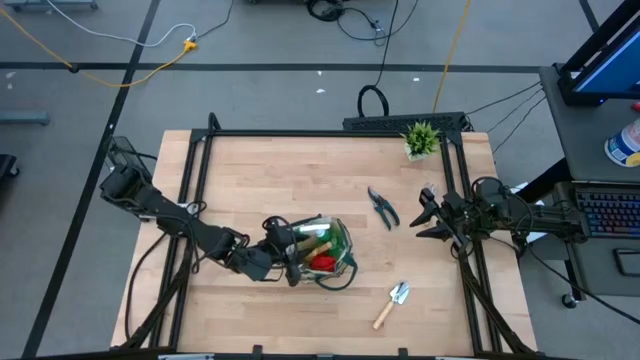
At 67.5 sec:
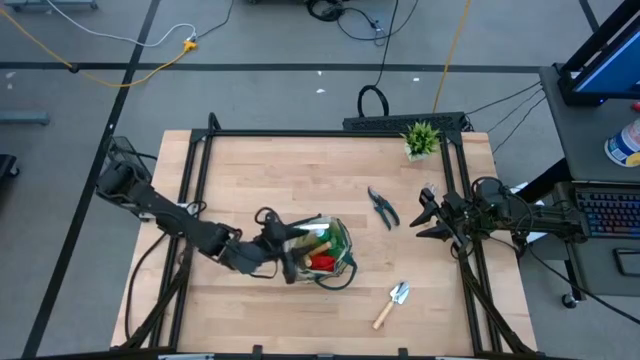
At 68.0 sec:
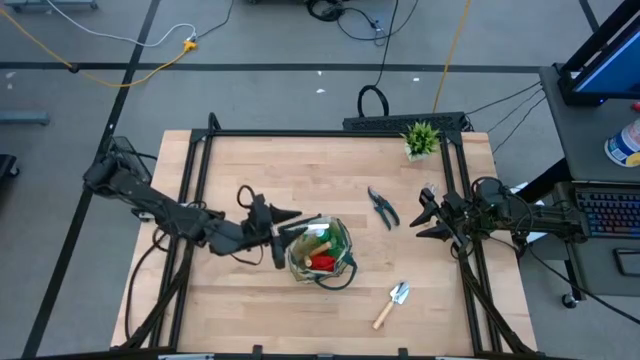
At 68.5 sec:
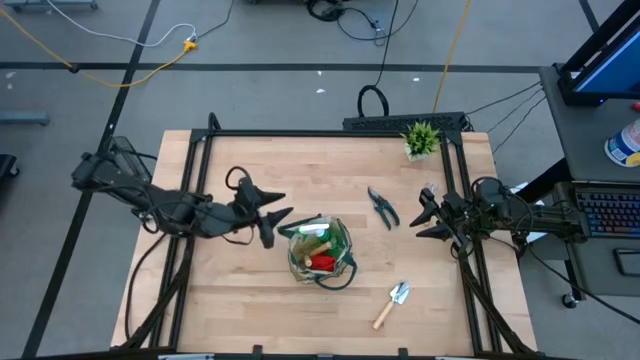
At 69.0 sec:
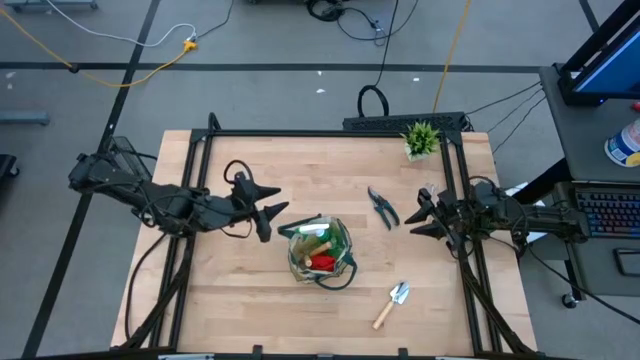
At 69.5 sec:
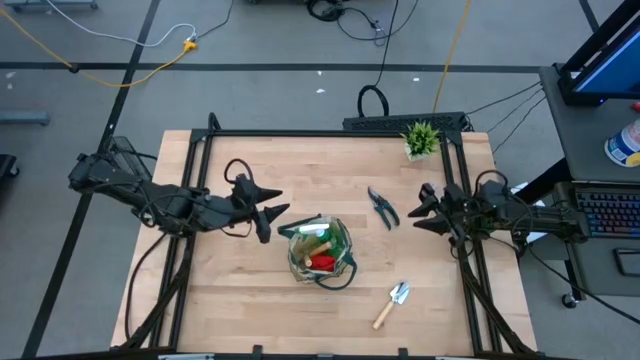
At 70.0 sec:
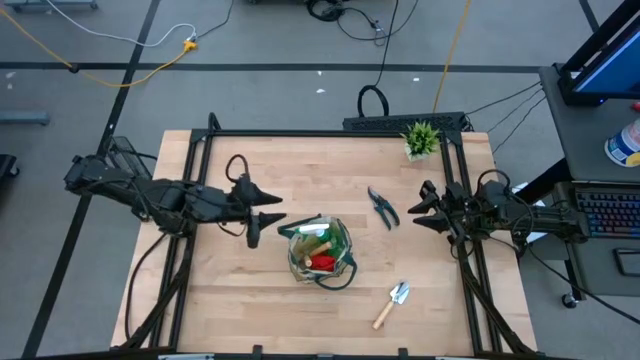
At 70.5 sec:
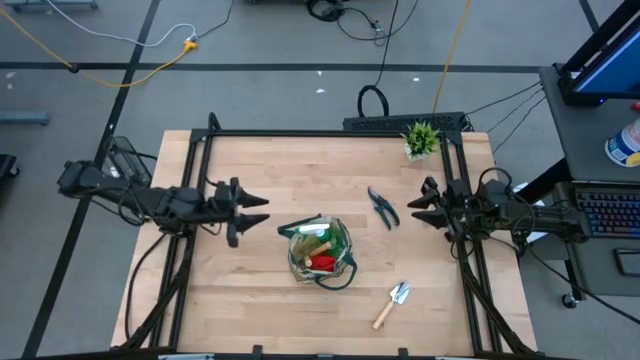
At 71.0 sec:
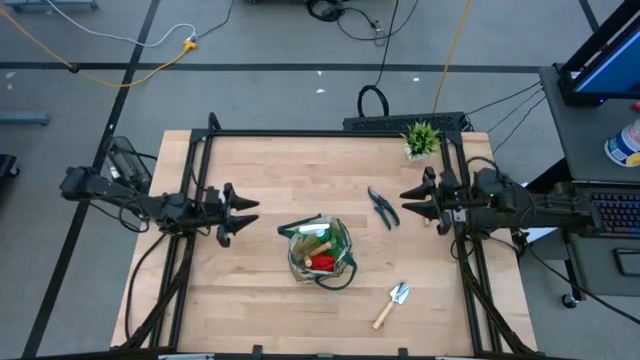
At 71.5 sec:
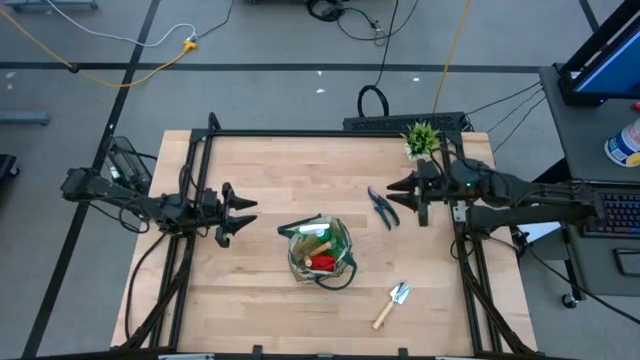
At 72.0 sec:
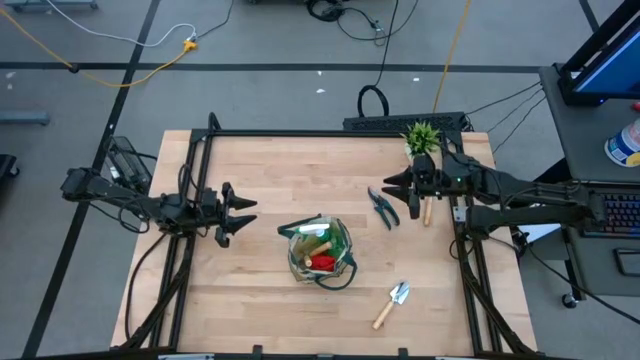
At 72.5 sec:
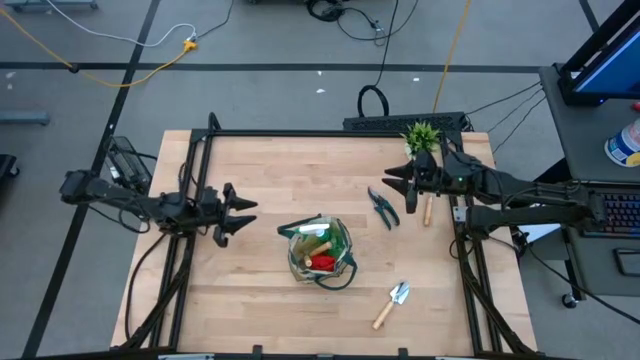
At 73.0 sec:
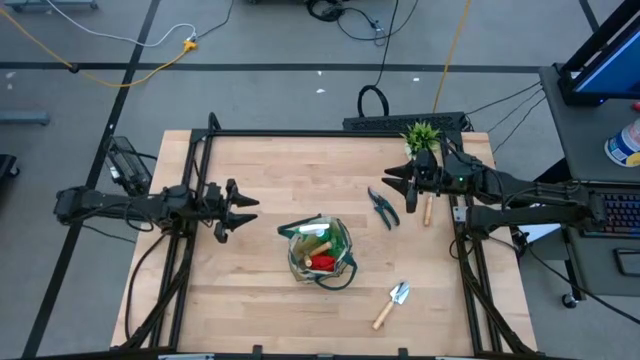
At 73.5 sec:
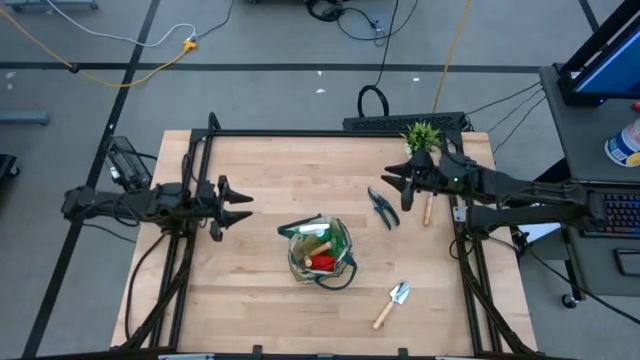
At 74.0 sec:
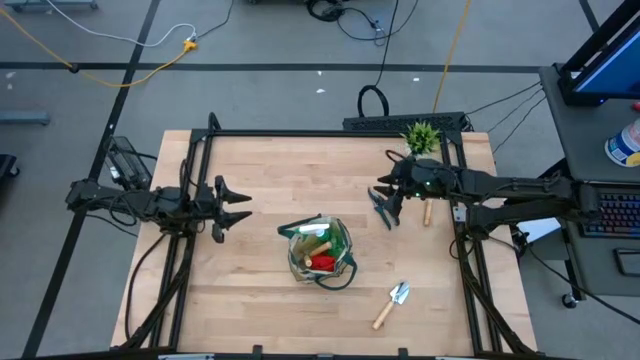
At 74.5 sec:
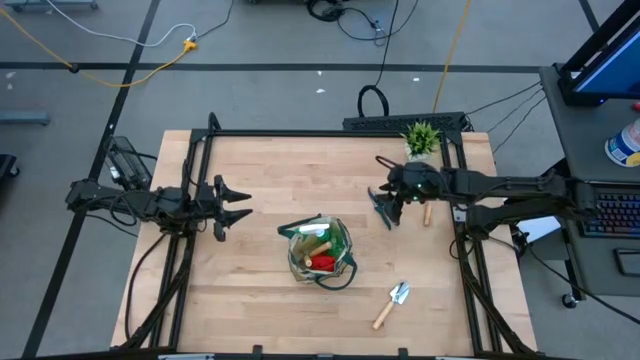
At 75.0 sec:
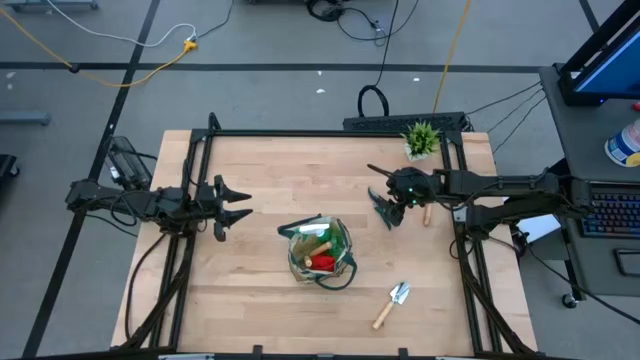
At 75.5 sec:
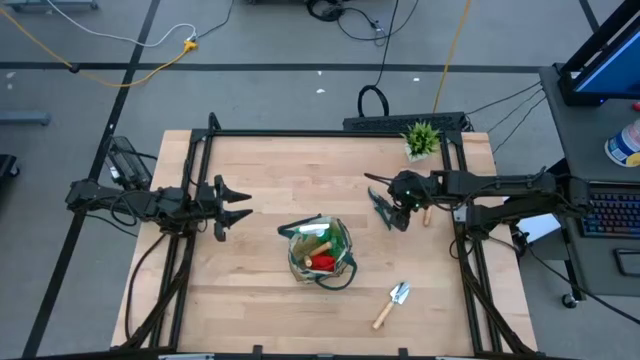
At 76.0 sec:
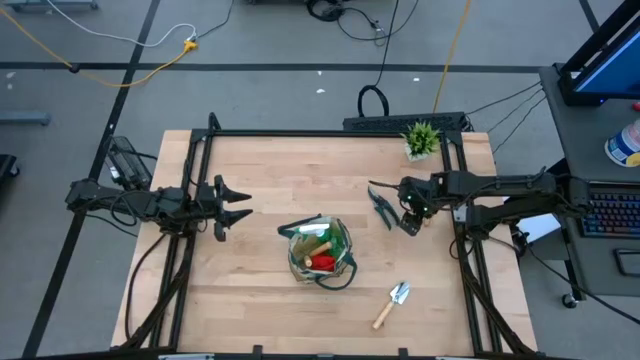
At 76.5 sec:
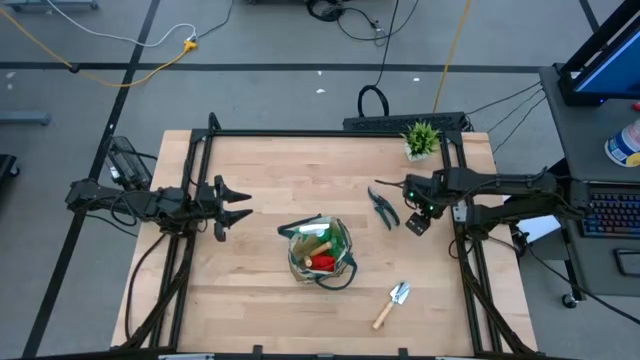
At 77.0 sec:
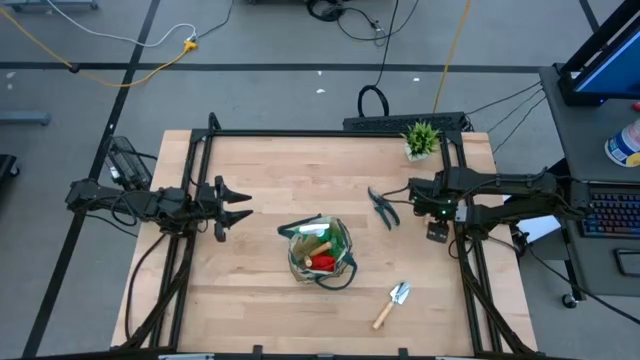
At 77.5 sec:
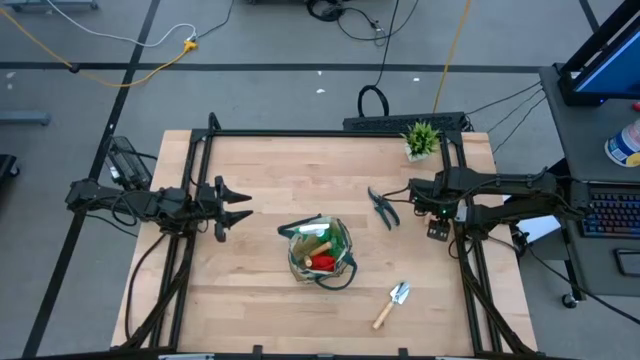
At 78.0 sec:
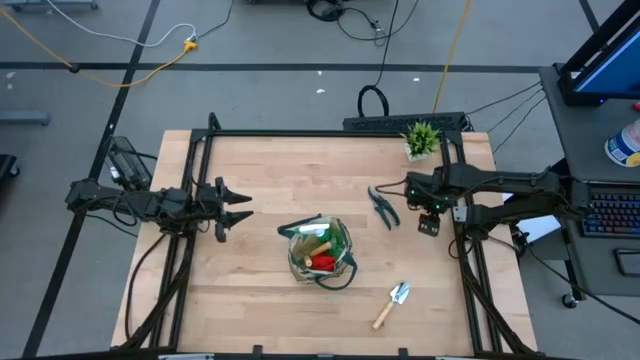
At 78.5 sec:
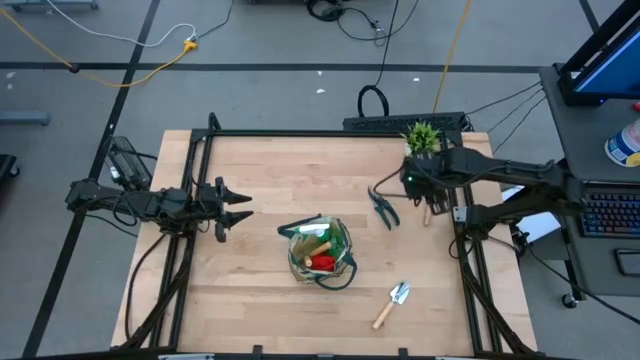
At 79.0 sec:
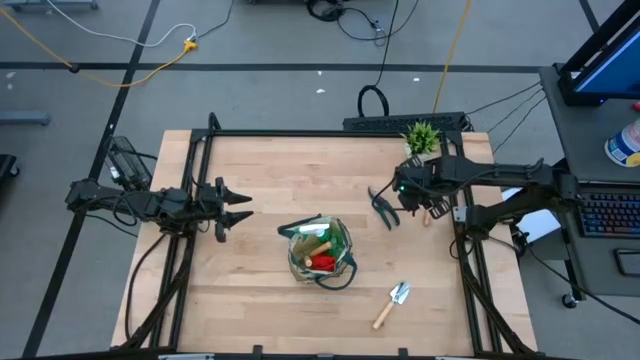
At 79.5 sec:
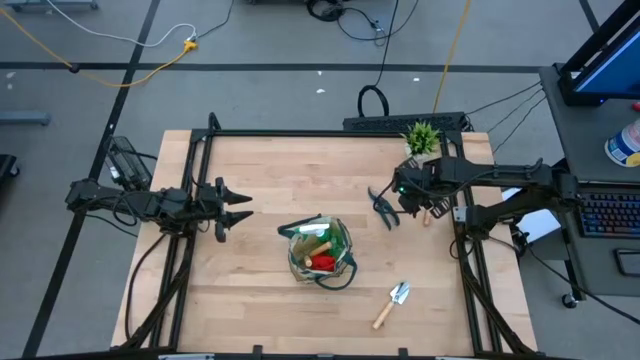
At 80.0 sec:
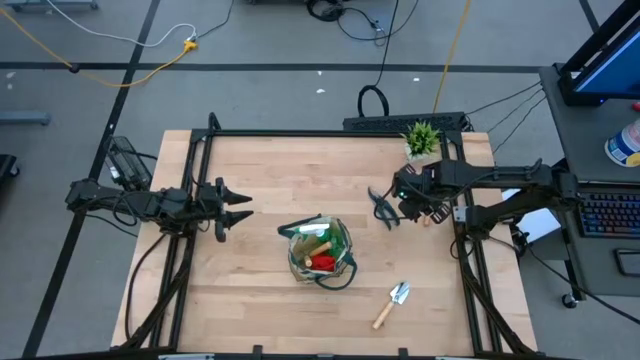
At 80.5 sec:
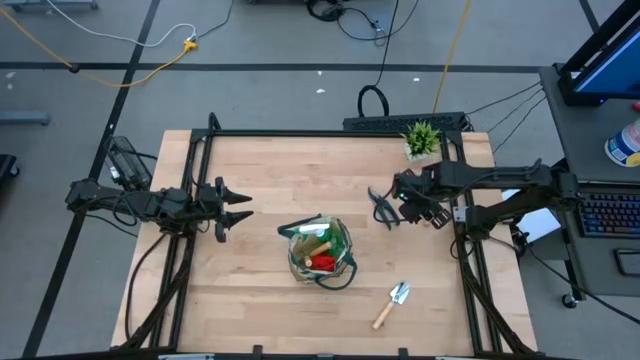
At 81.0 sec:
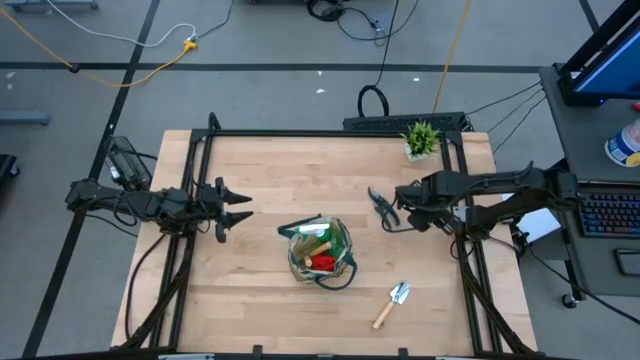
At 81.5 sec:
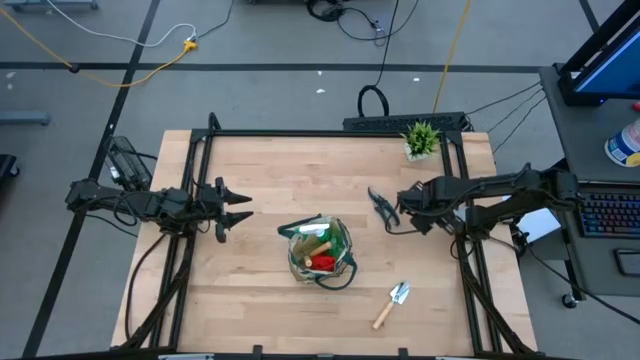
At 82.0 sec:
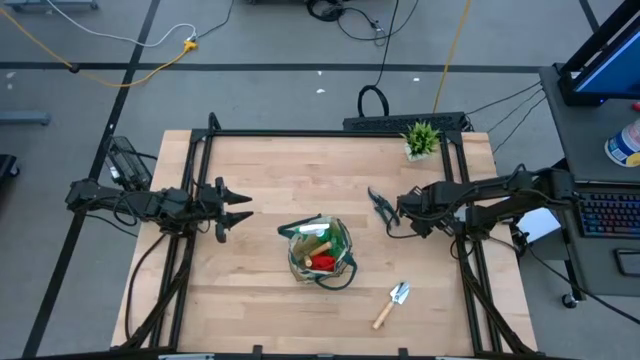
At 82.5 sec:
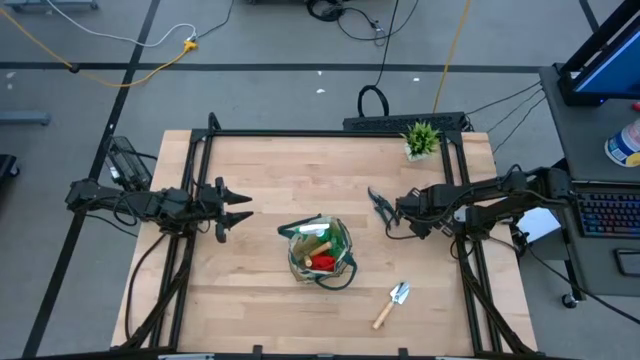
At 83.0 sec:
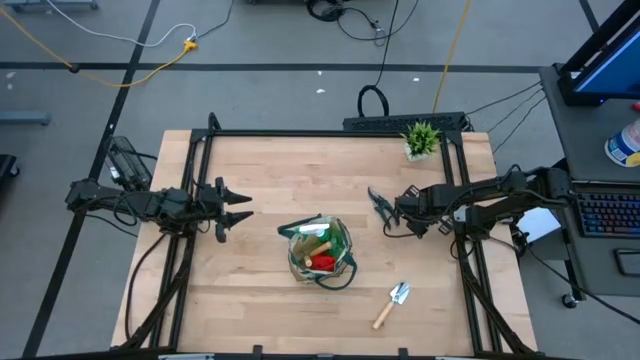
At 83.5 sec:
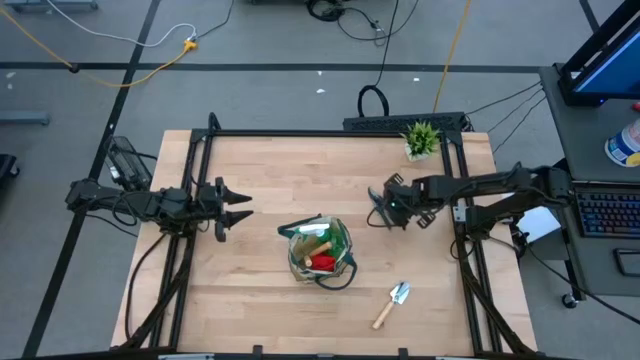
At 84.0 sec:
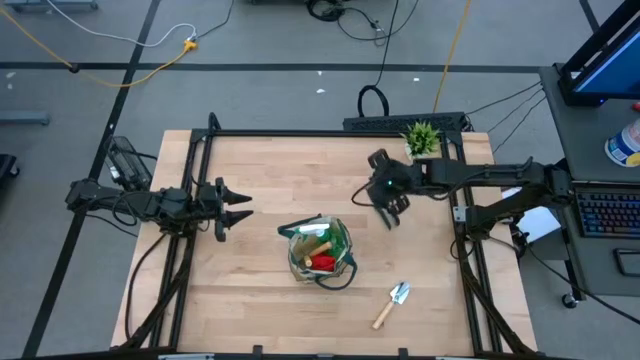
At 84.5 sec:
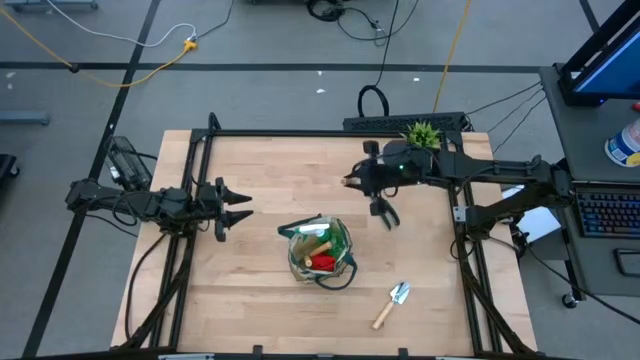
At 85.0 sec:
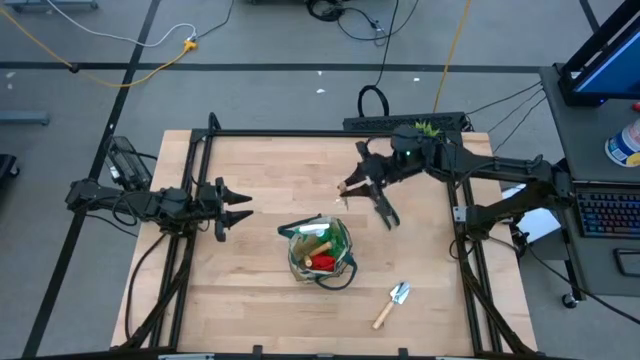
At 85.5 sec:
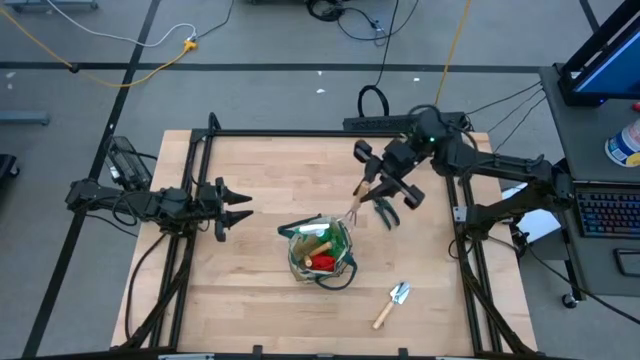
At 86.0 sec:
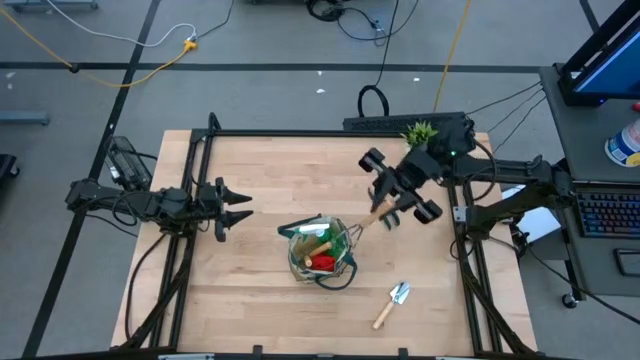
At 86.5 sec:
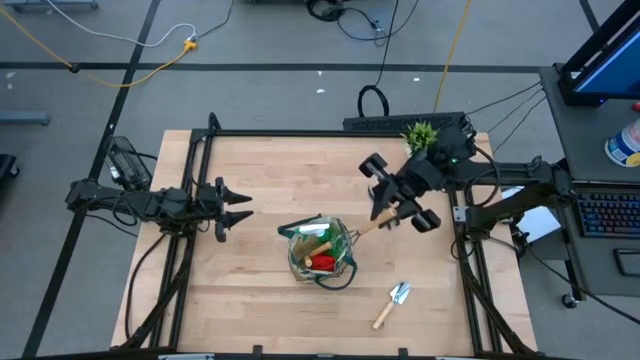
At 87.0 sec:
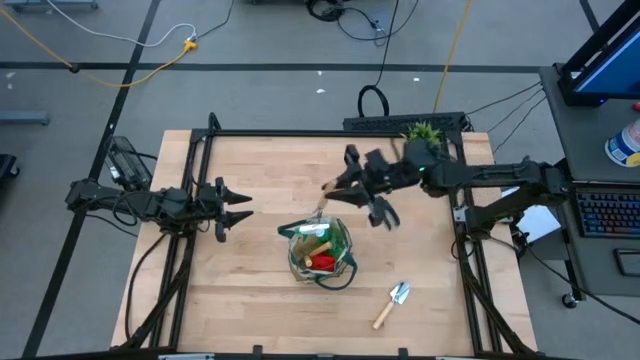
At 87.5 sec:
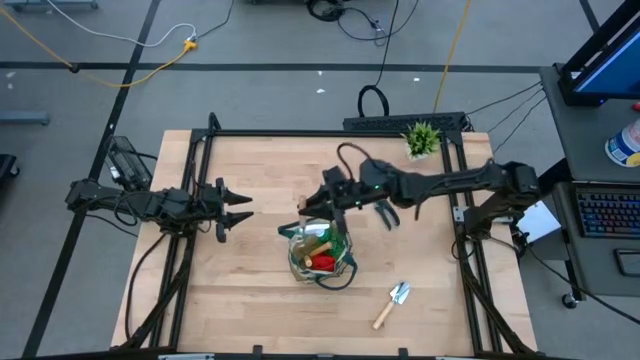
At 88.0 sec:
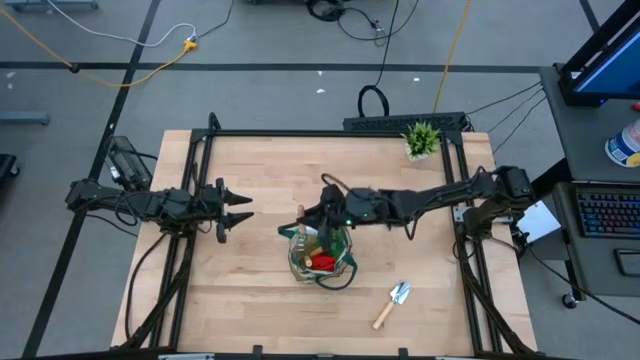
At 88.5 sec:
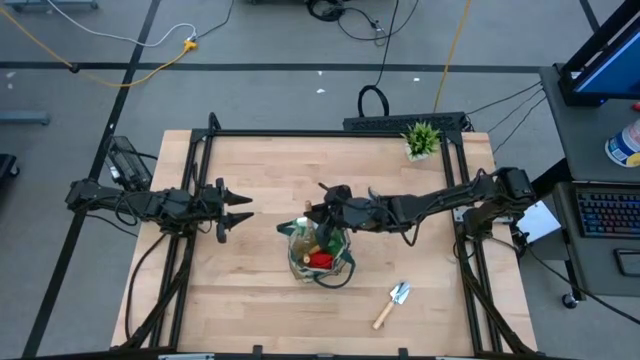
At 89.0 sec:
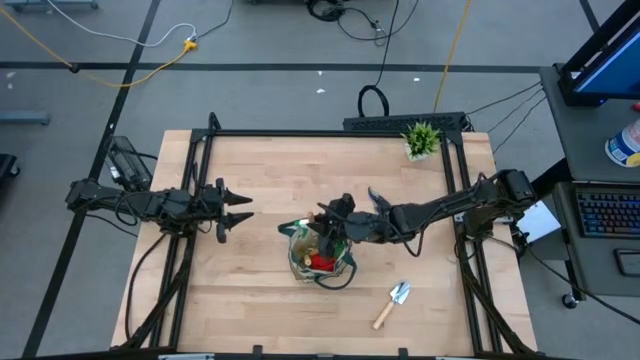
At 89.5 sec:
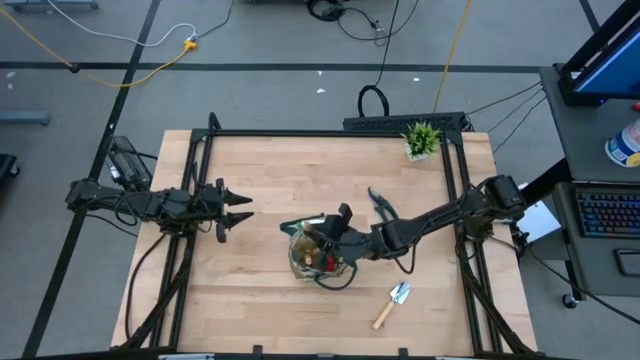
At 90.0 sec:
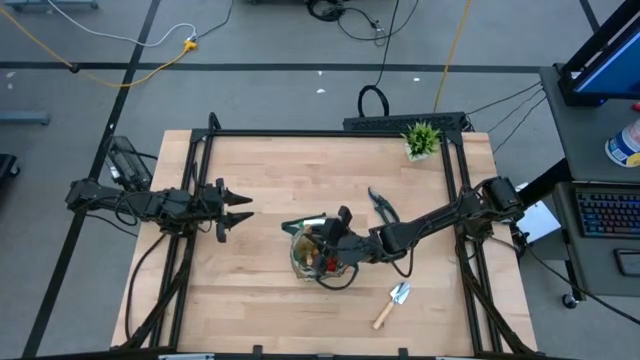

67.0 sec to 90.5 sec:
Task: Pick & Place Garden tools in Gardening bag
Put the brown hand rake into the gardening bag
